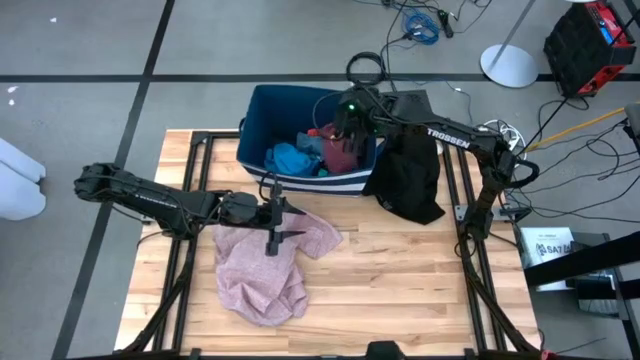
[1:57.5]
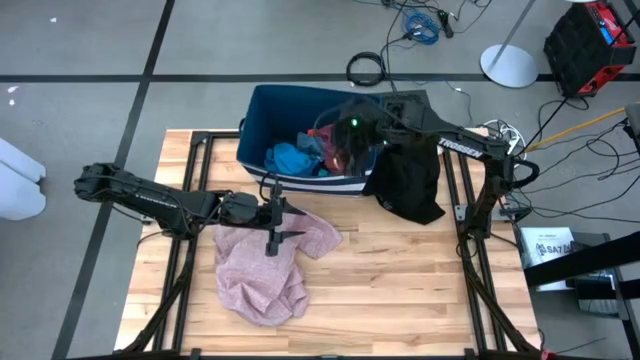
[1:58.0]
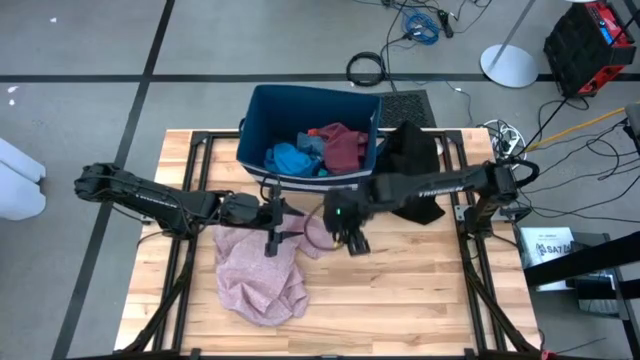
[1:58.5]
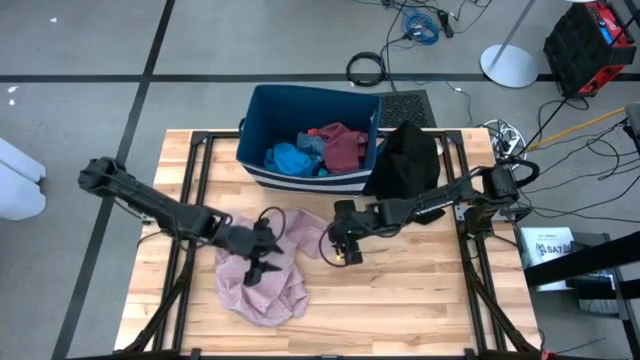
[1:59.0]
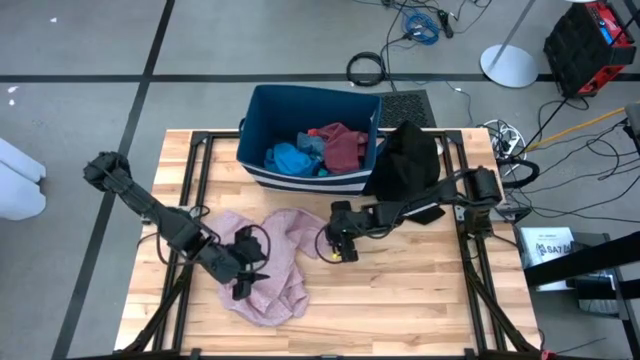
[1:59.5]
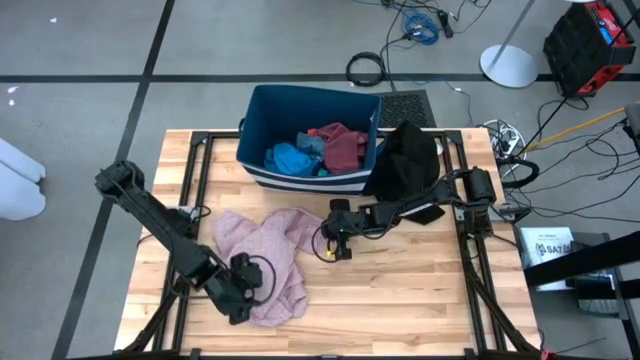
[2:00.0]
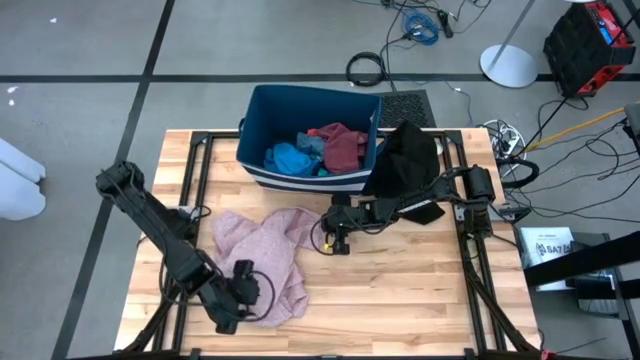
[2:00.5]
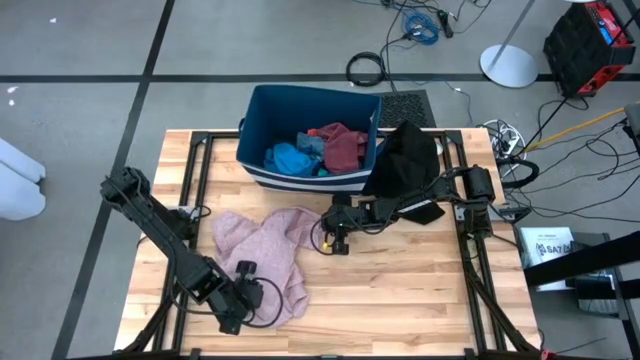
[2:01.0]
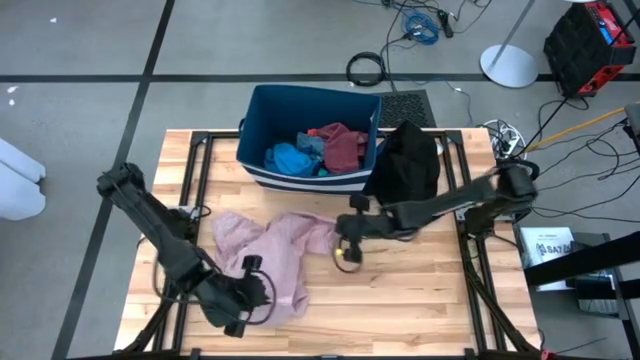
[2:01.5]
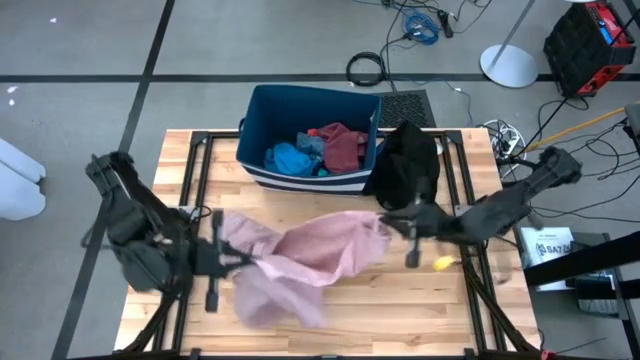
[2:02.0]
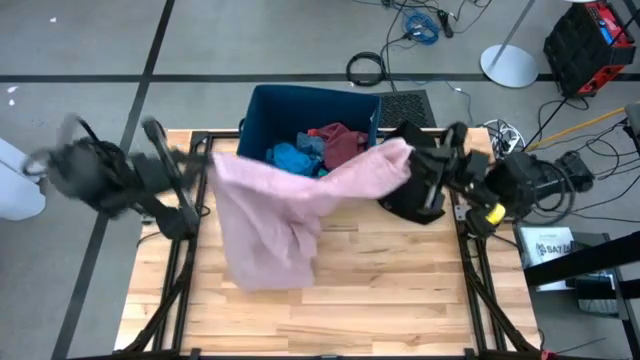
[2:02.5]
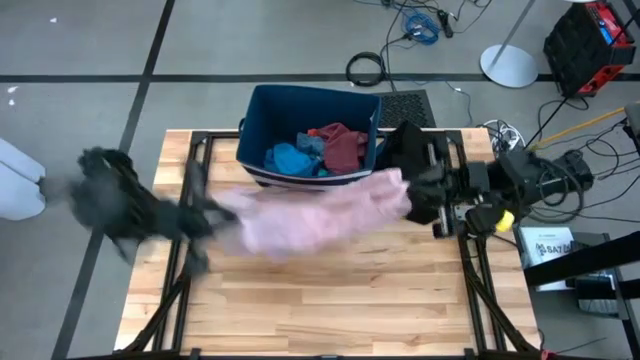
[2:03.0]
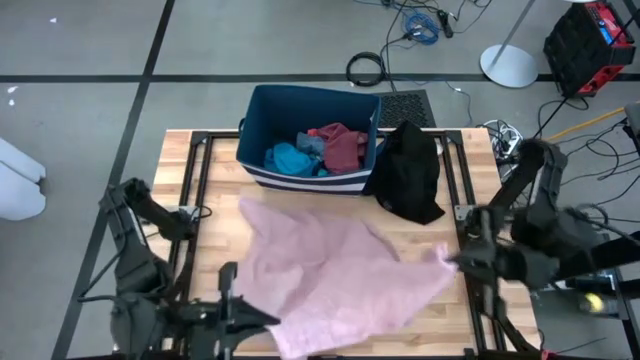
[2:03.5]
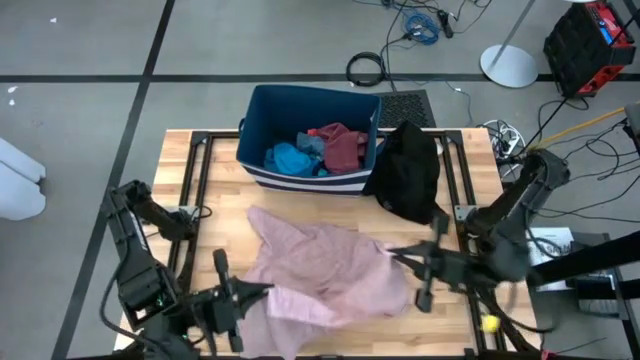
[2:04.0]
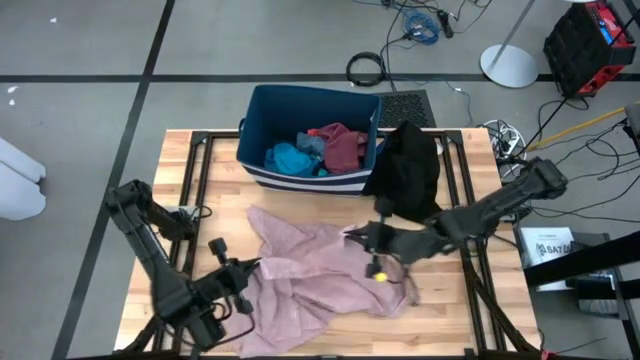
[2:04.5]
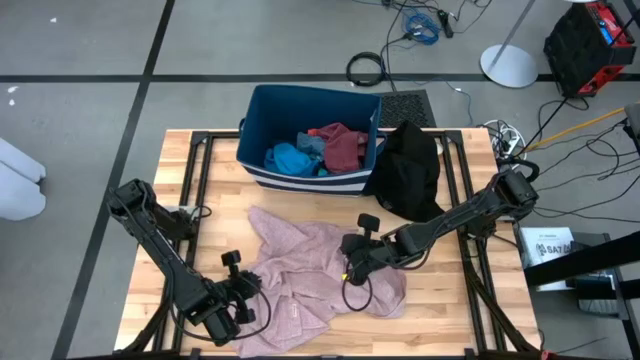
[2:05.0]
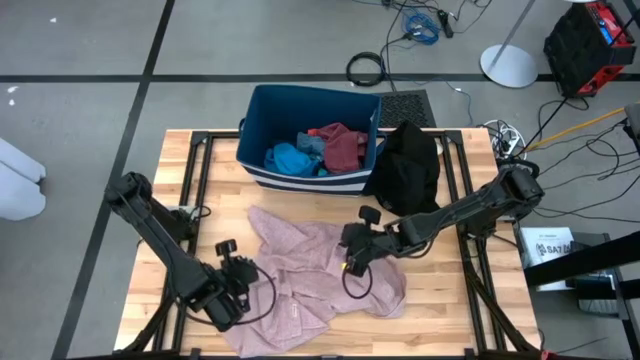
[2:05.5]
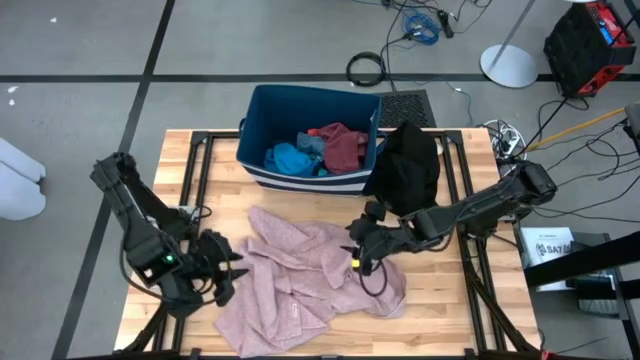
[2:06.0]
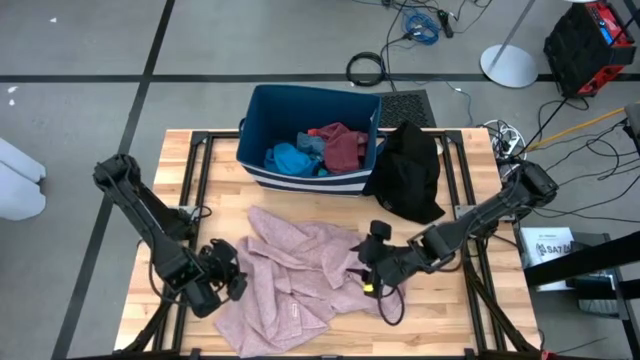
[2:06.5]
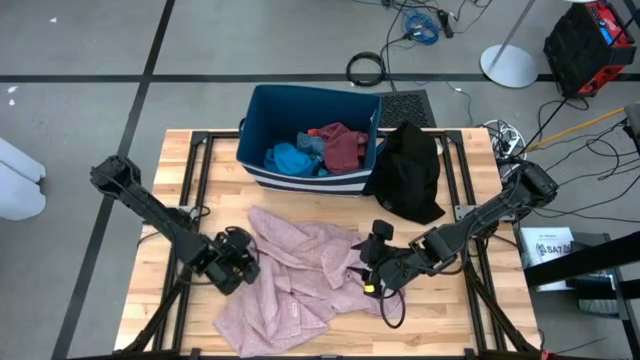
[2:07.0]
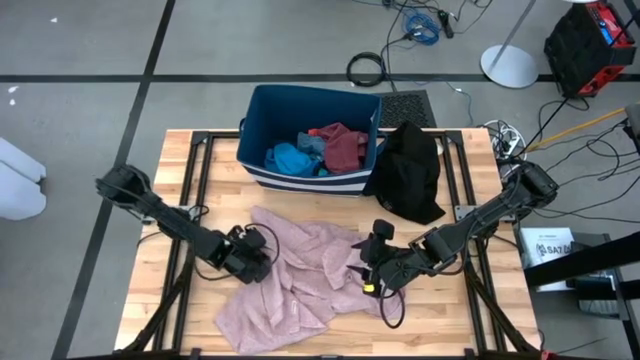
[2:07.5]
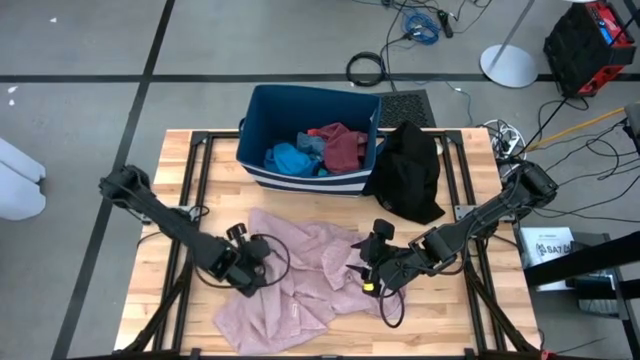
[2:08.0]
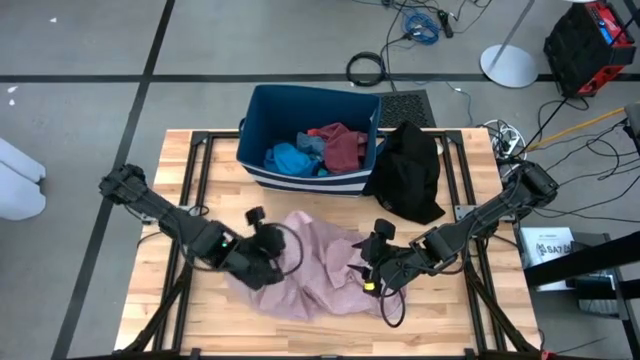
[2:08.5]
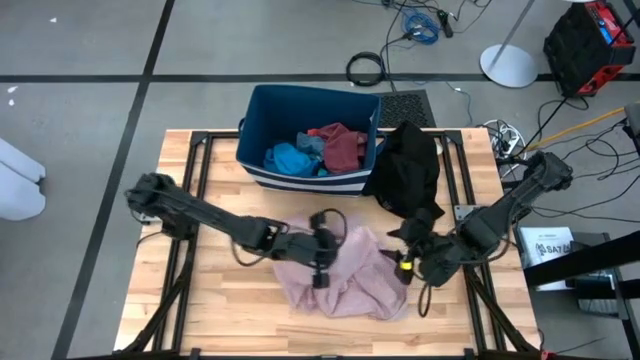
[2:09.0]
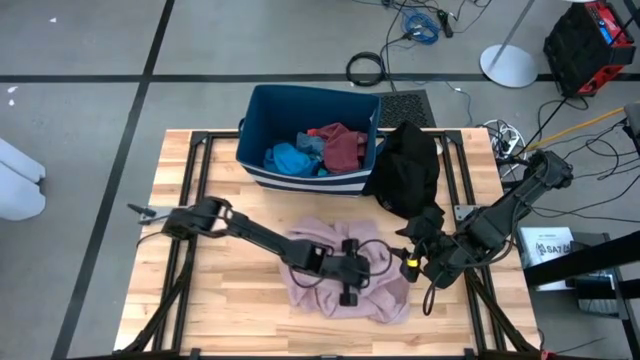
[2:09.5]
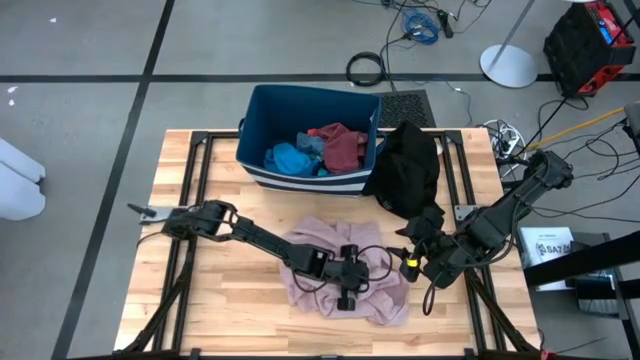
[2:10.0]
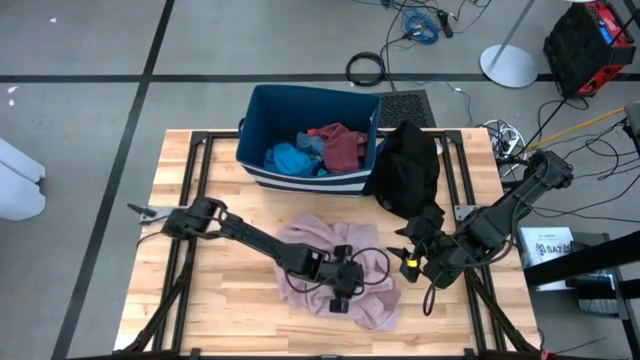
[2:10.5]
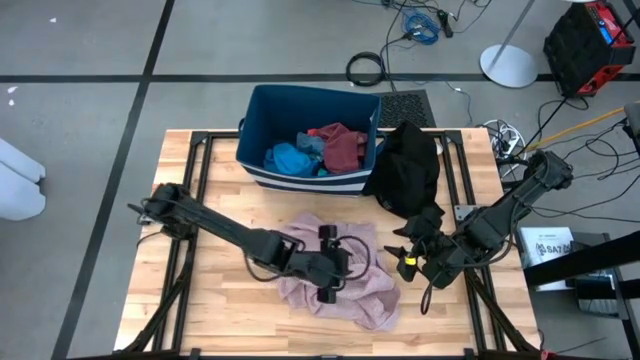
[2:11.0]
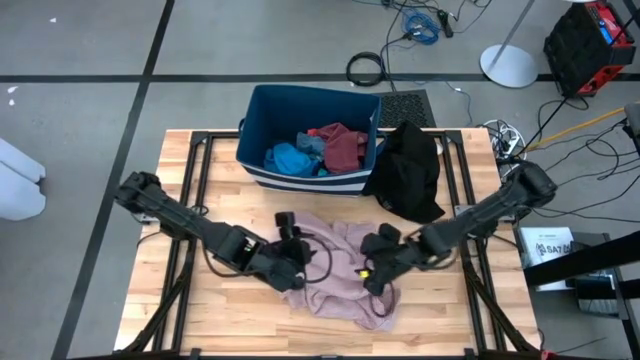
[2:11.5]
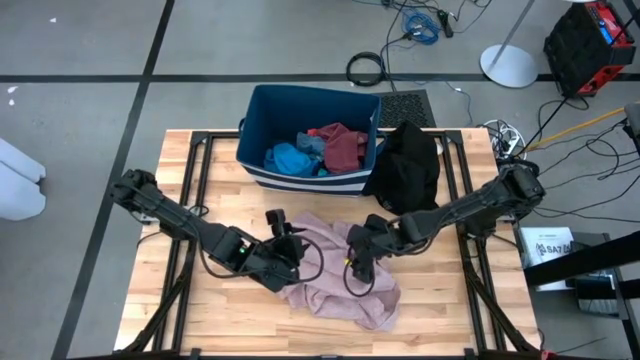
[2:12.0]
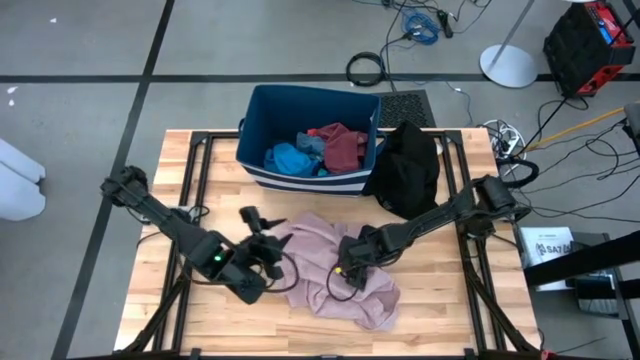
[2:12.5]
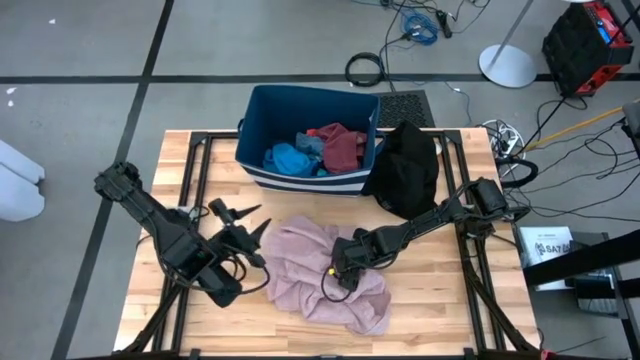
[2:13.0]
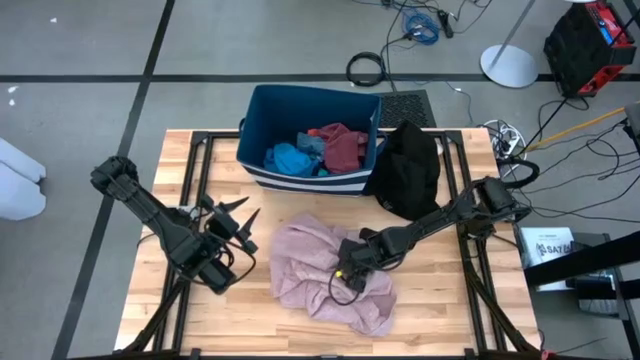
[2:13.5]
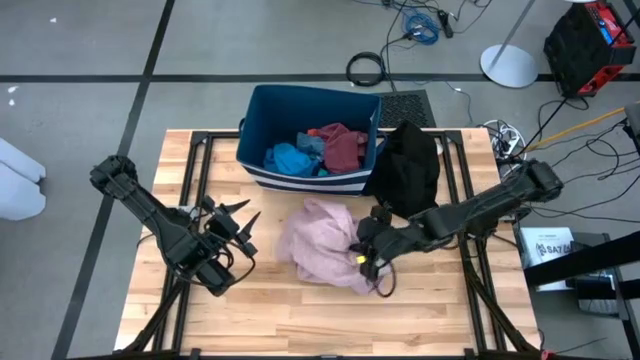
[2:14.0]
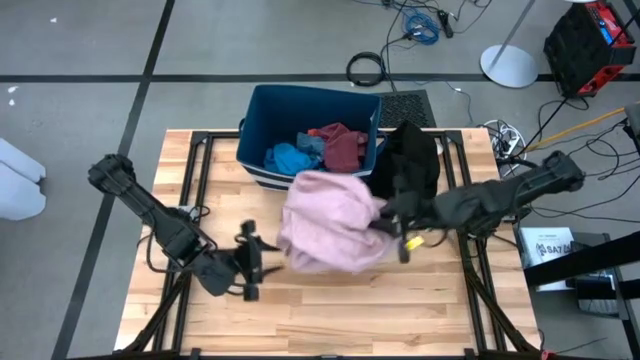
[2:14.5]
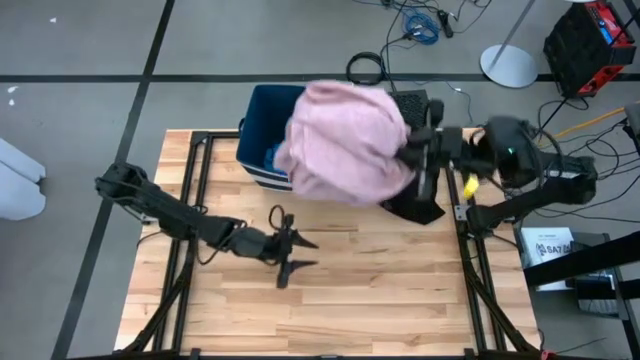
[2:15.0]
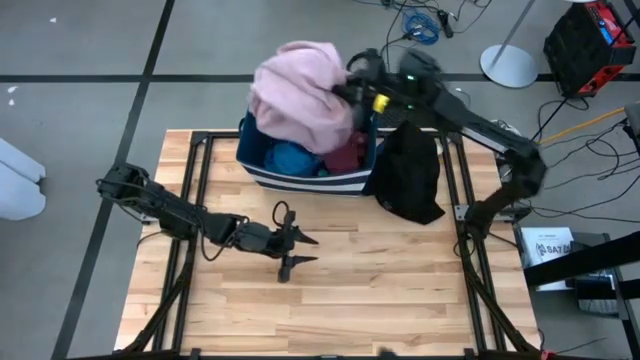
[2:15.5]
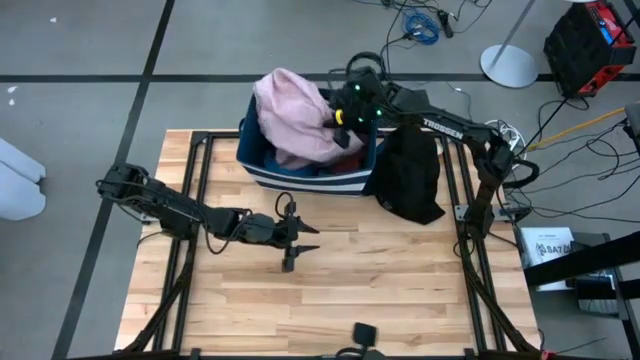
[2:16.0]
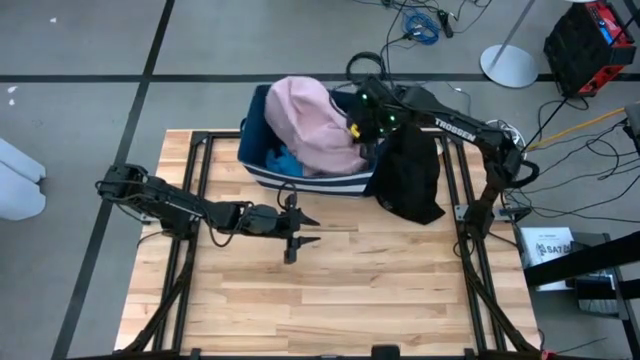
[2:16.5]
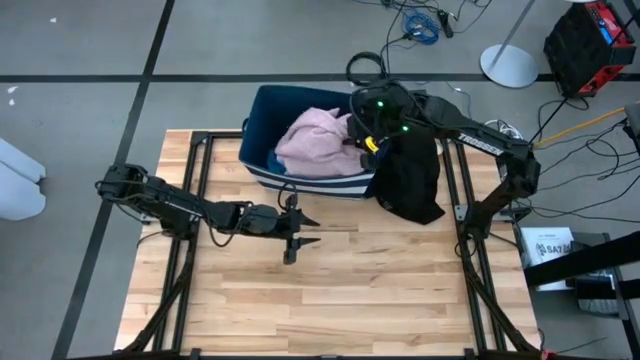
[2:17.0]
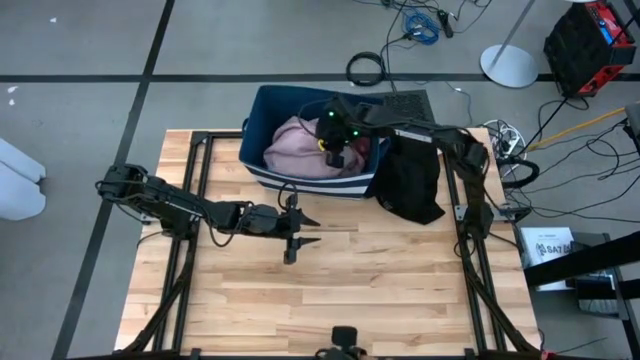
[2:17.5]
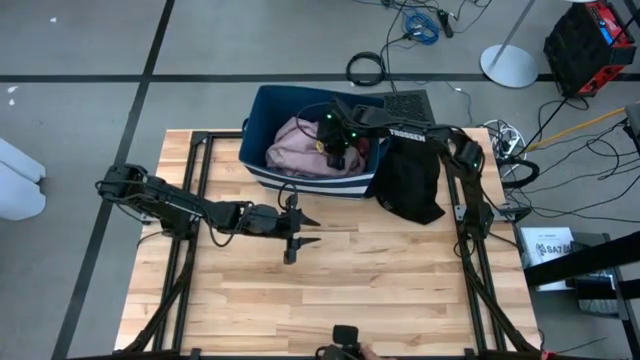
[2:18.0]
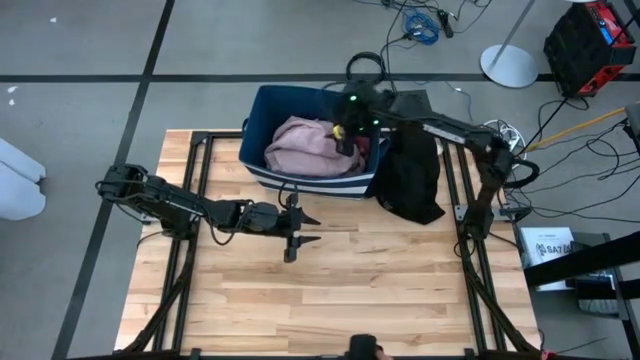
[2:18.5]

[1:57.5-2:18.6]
Task: Sort clothes
Put the pink polo shirt into the blue laundry organizer
